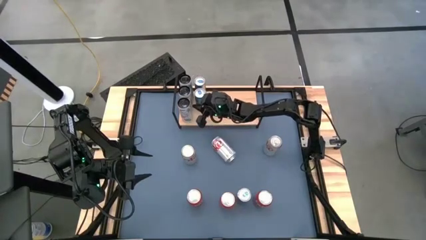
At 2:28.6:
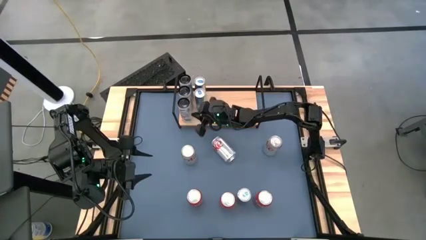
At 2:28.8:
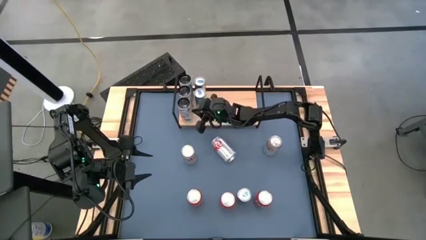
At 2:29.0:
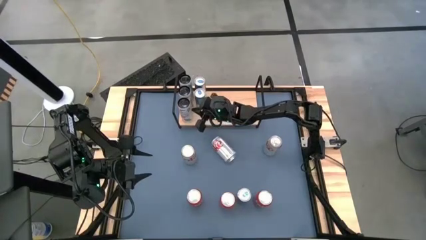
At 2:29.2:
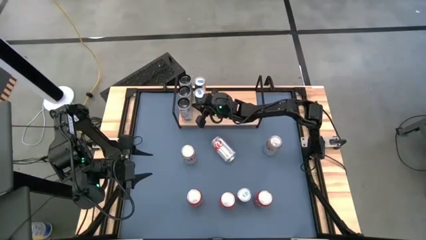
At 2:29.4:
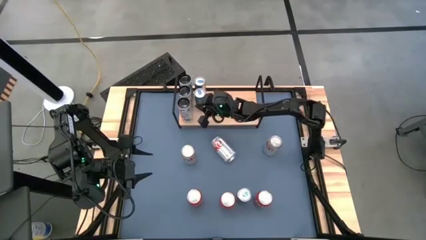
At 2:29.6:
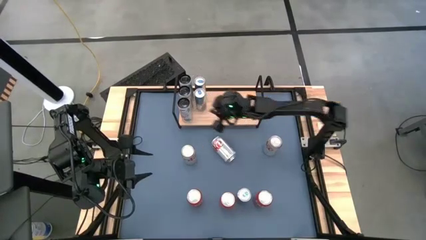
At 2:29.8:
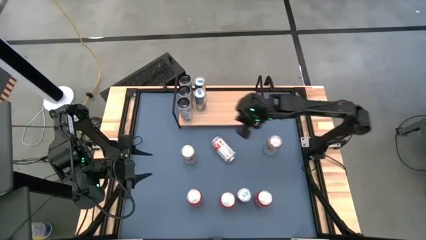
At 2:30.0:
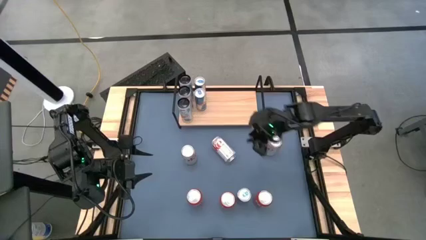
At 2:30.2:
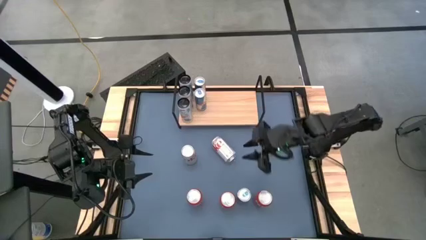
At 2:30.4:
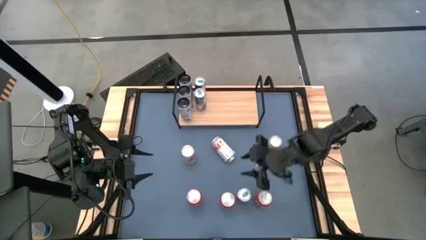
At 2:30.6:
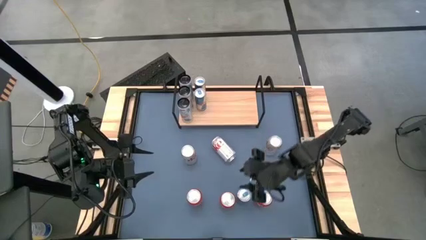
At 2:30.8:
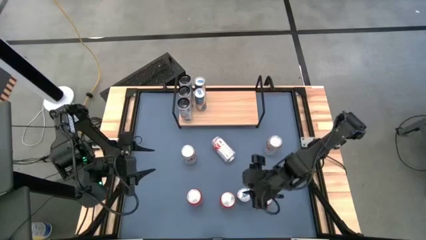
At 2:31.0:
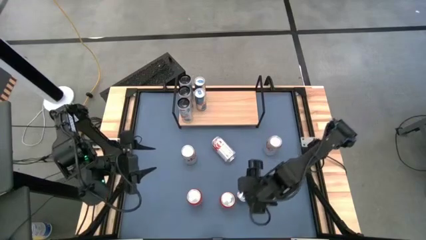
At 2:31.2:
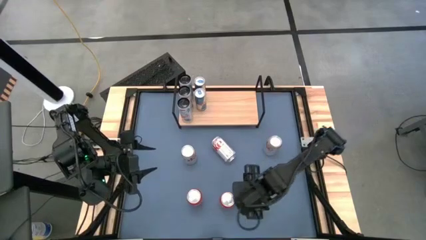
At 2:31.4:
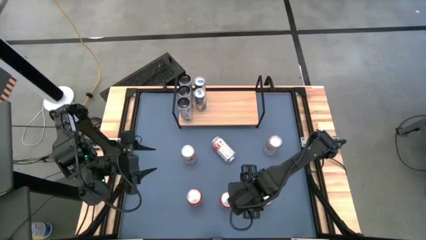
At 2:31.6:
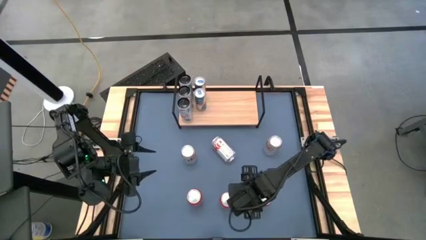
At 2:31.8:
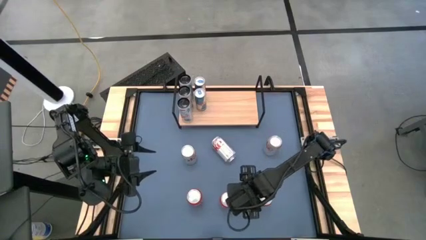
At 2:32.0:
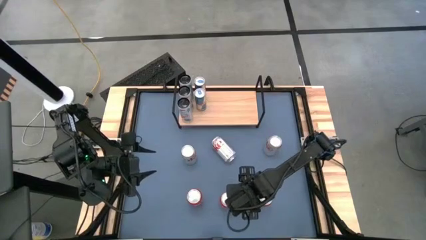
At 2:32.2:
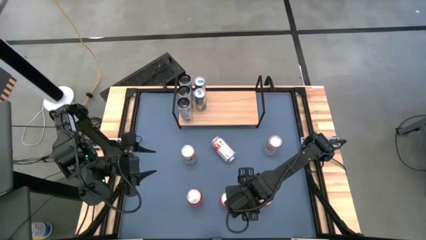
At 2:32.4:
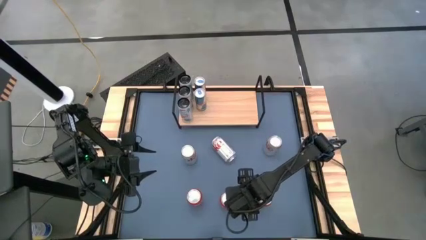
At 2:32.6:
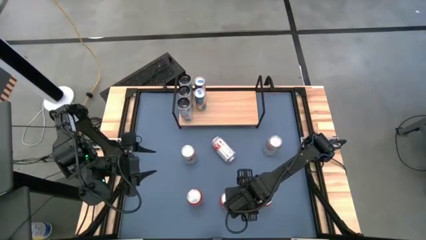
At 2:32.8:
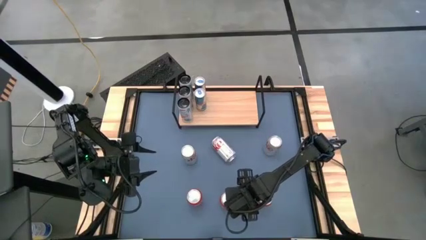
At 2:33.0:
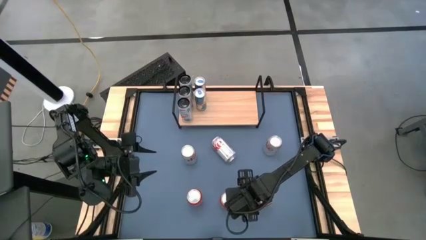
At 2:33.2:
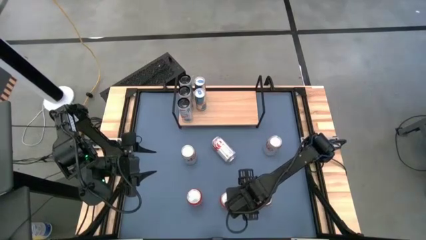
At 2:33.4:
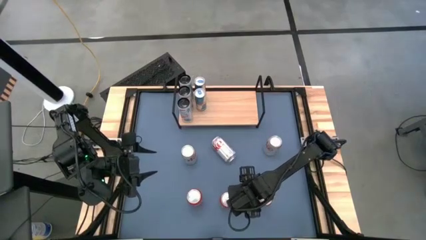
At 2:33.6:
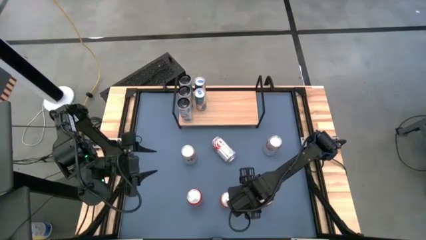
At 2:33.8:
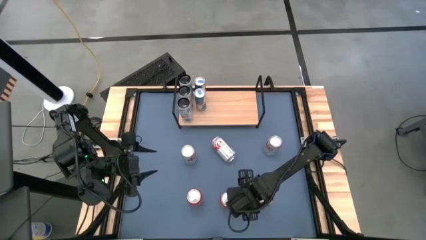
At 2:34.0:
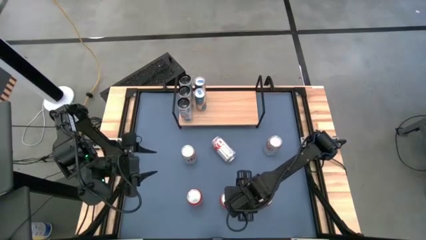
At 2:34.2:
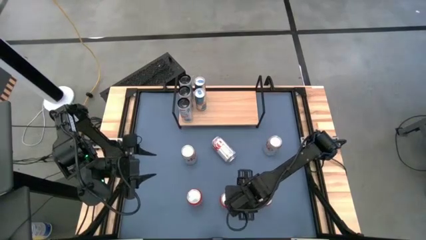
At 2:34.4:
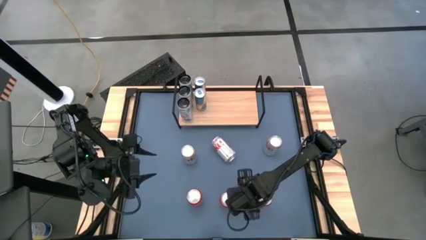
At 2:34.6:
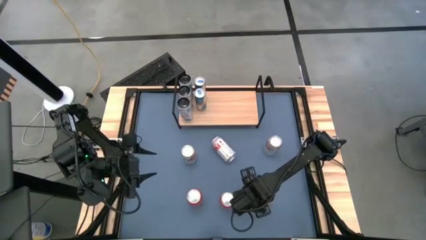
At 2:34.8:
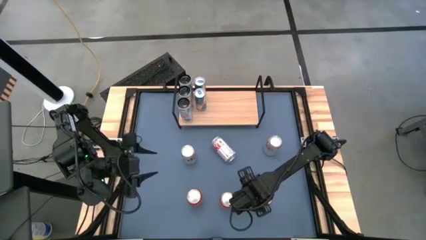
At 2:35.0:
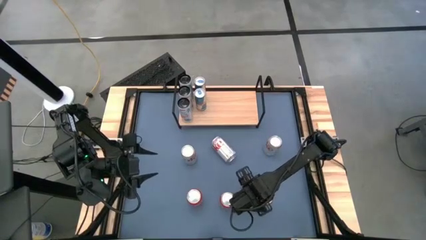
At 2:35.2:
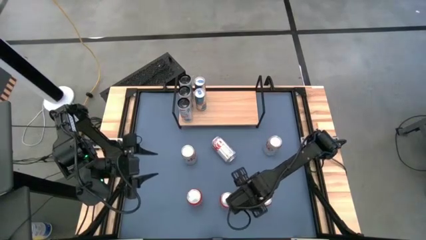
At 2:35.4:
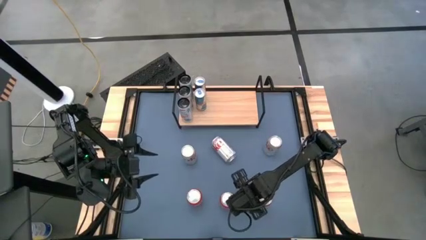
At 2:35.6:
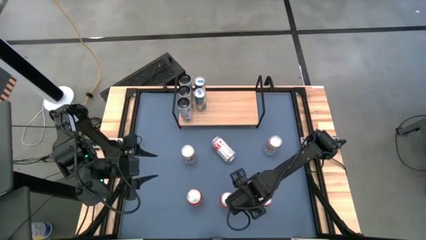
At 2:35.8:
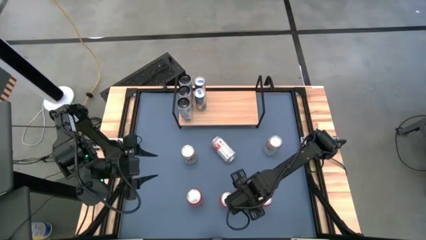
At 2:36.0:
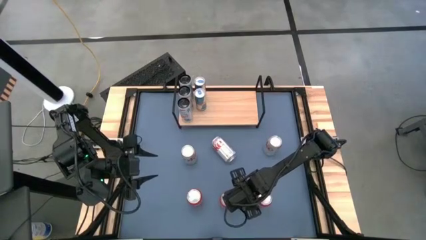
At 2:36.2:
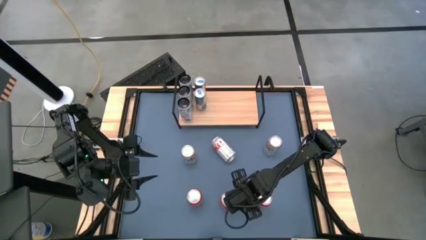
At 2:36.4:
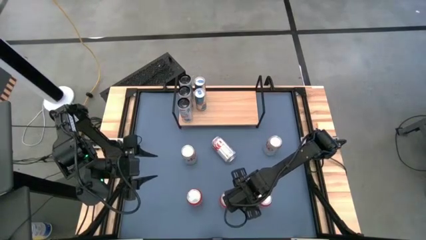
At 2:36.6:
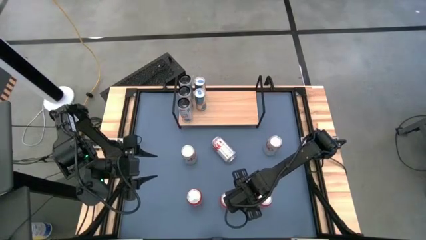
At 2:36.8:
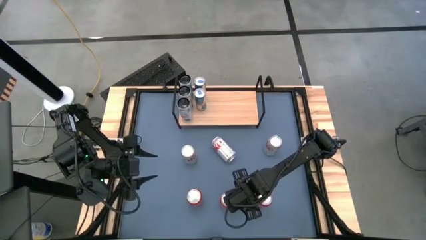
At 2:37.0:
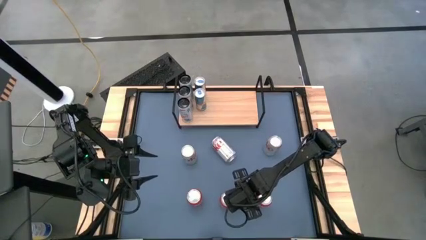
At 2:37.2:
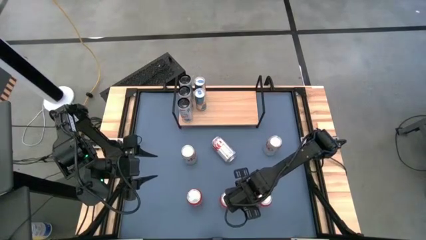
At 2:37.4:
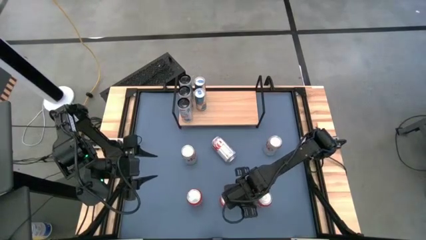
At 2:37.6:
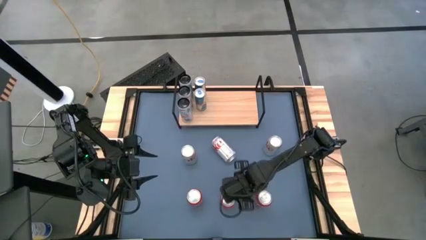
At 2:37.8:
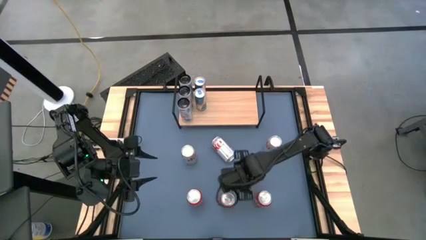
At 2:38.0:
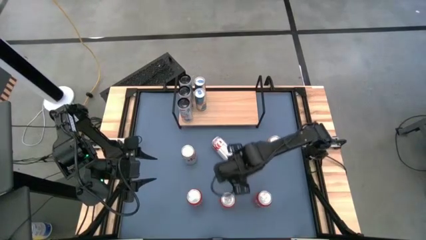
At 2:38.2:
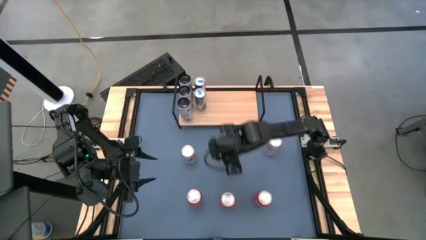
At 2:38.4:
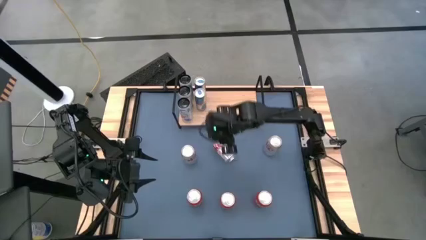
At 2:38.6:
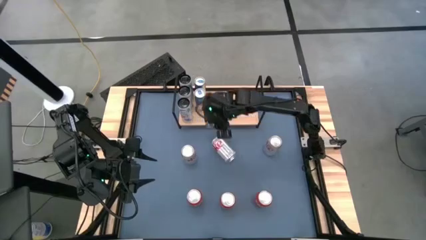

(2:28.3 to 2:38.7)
Task: Place canned beverage on shelf
Put the blue soda can aligned with the other blue soda cans on the shelf

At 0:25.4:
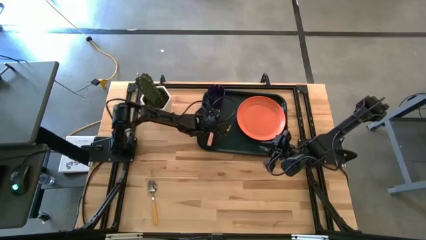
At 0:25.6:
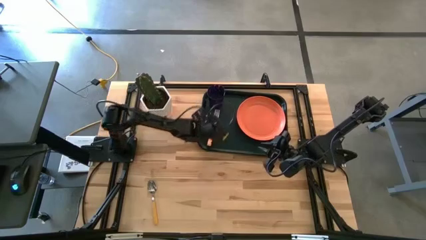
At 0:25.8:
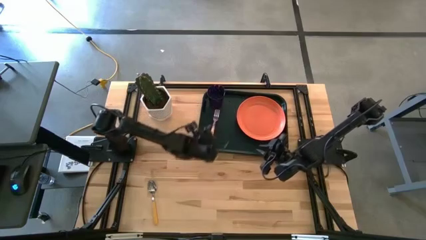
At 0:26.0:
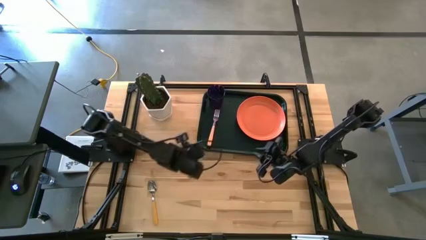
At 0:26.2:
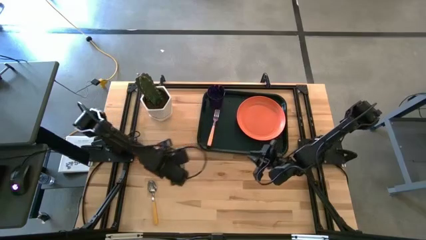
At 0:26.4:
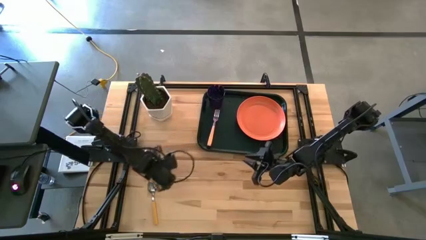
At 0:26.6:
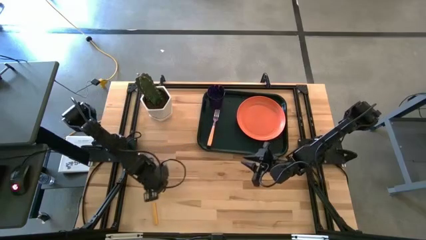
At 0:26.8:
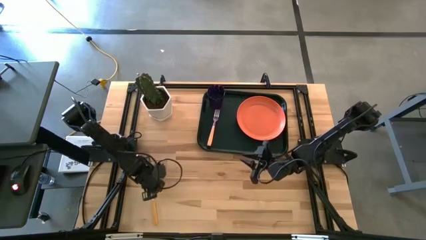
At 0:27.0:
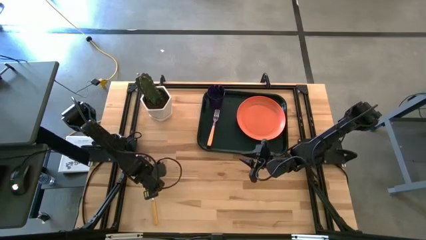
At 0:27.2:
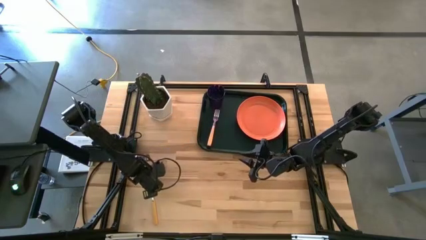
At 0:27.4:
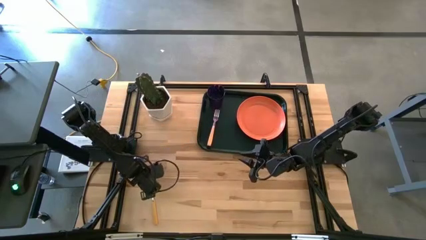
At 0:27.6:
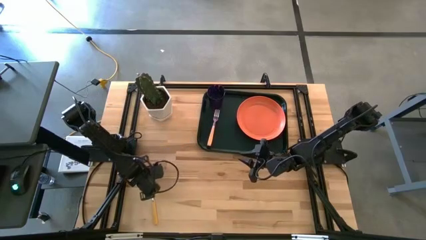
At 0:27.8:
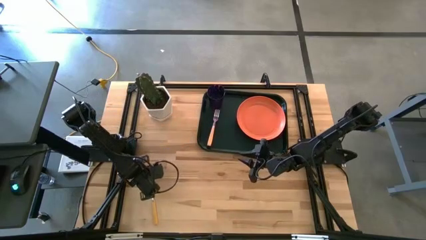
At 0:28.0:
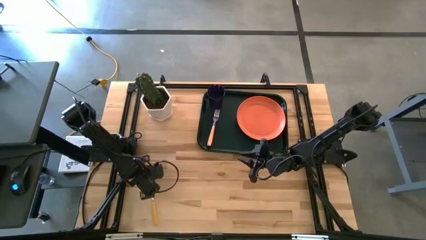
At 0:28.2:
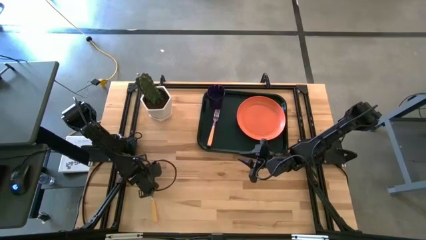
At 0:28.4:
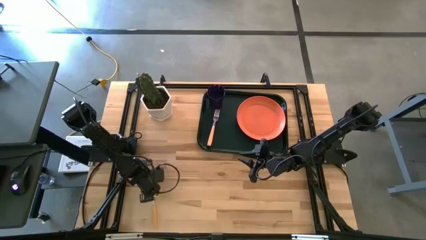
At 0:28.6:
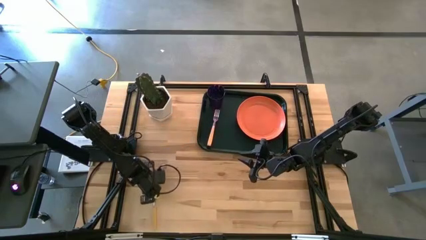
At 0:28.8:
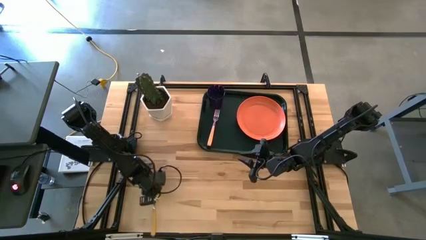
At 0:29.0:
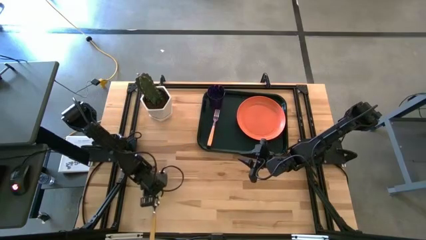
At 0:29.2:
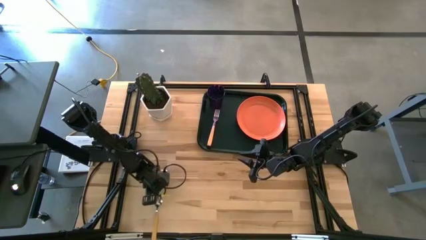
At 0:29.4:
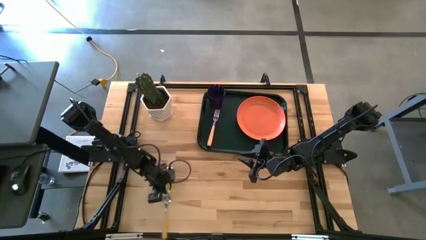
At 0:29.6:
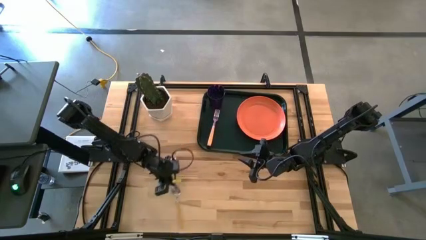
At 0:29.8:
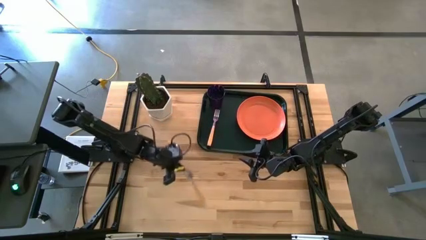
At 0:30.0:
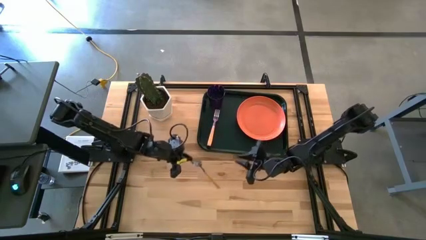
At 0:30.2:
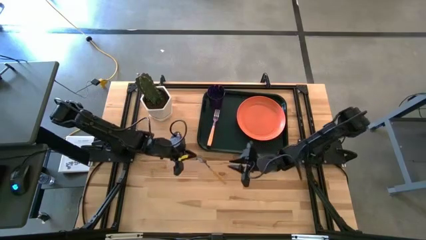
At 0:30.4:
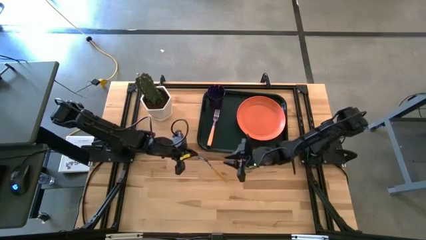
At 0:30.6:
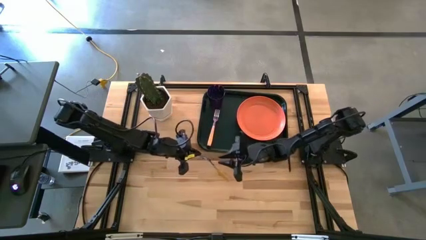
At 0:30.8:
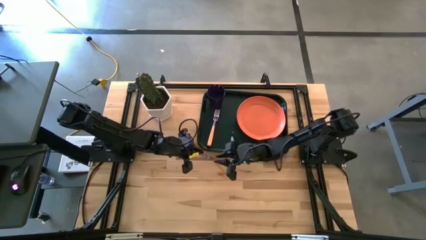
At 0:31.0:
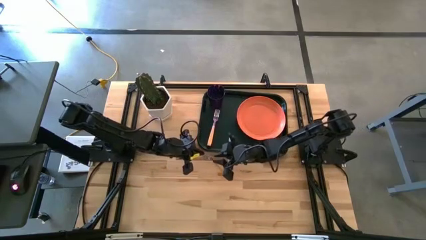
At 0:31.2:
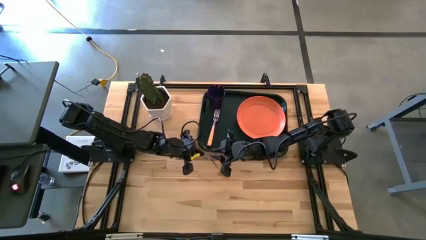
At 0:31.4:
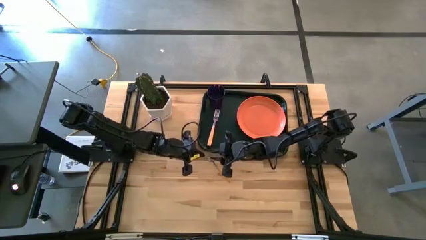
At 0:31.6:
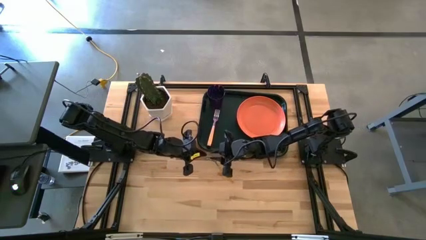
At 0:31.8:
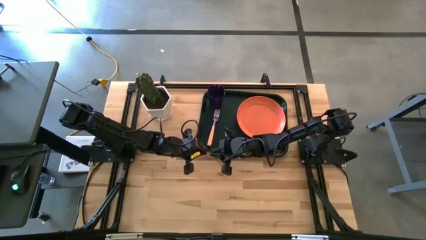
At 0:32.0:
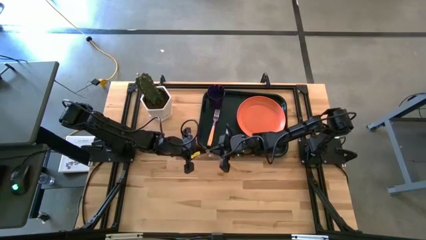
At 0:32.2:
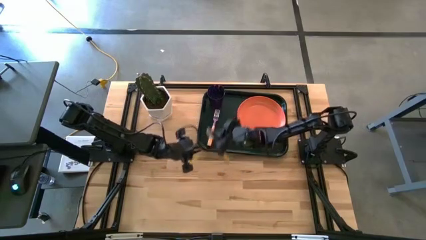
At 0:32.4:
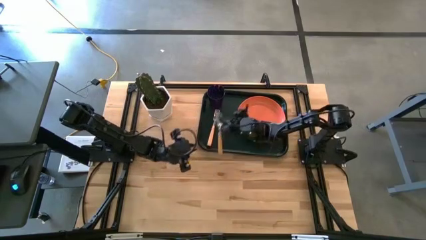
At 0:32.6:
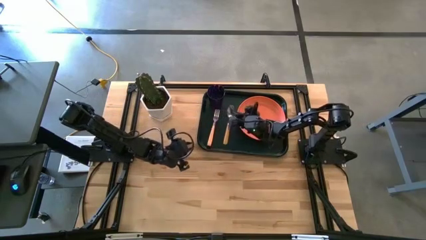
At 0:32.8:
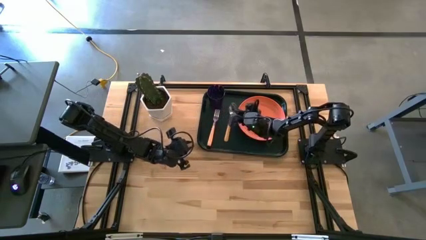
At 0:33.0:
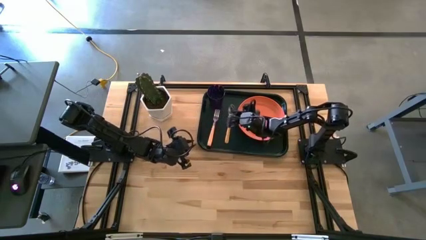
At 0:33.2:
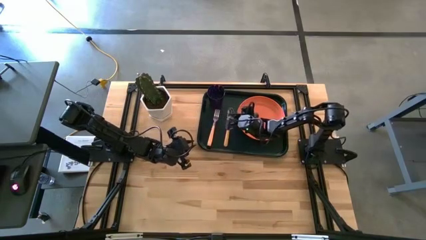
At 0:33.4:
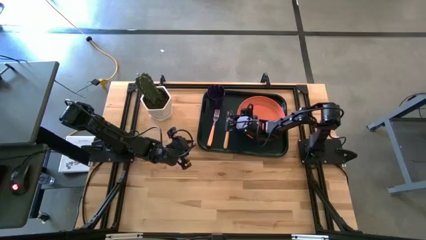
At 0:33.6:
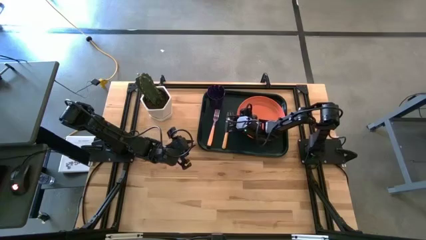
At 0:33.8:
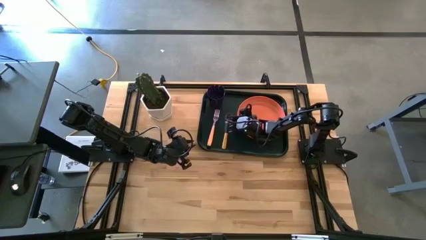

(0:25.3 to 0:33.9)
Task: Pick and place plate/cup/fork/spoon on tray
Put the spoon on the black tray to the right side of the orange plate
